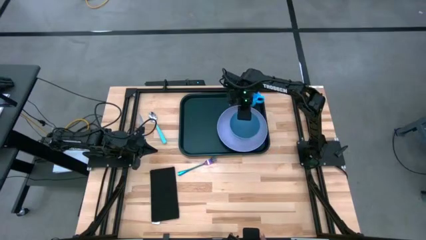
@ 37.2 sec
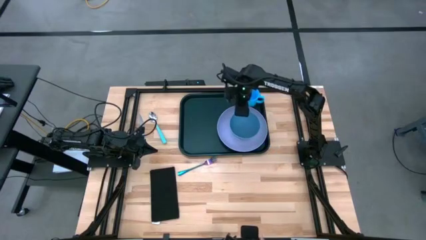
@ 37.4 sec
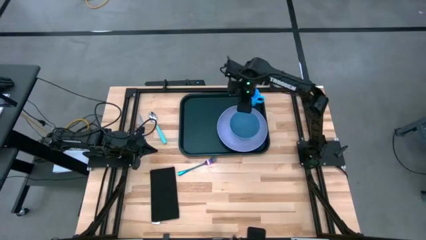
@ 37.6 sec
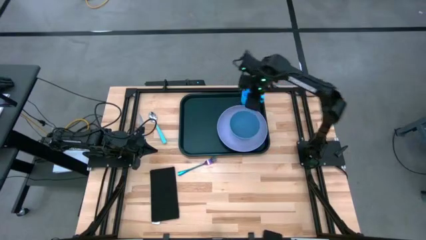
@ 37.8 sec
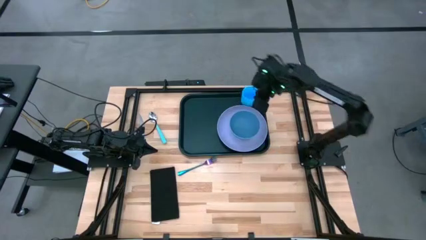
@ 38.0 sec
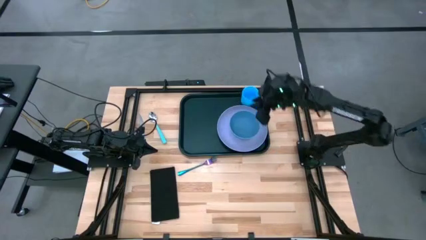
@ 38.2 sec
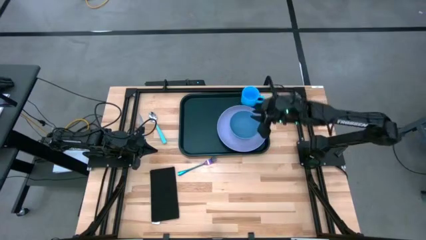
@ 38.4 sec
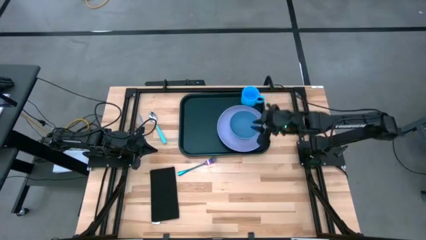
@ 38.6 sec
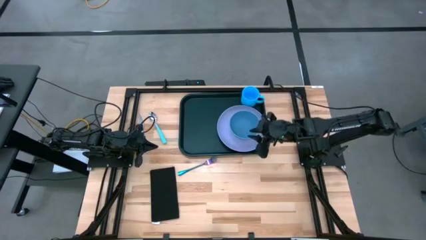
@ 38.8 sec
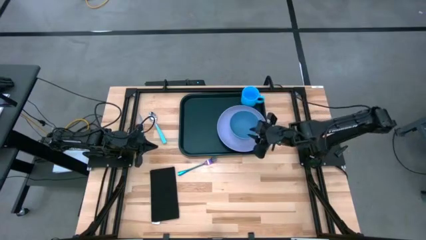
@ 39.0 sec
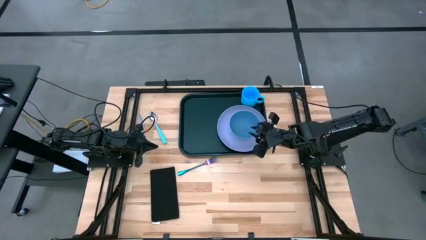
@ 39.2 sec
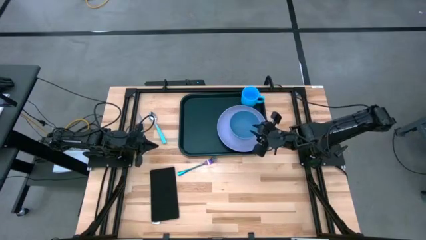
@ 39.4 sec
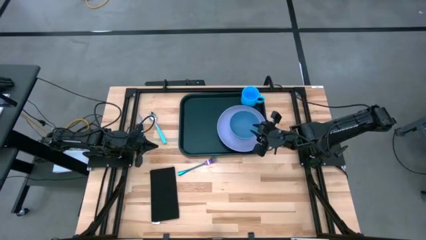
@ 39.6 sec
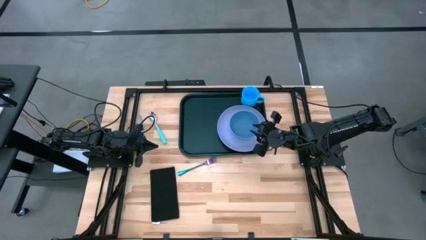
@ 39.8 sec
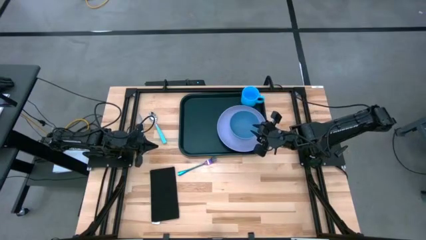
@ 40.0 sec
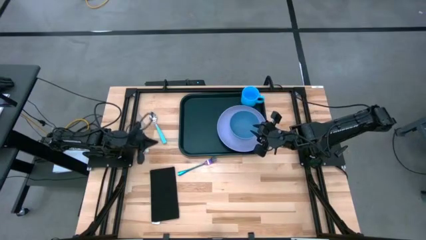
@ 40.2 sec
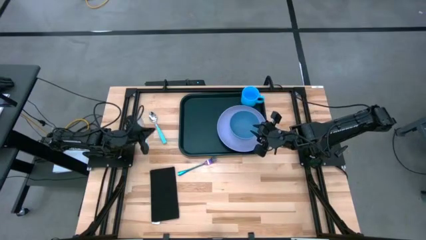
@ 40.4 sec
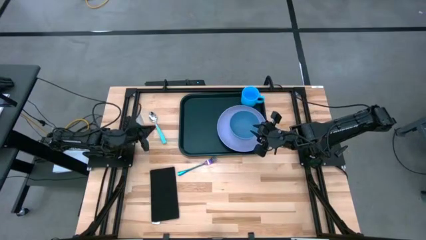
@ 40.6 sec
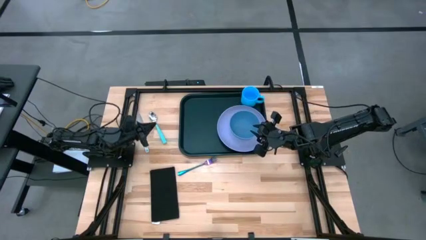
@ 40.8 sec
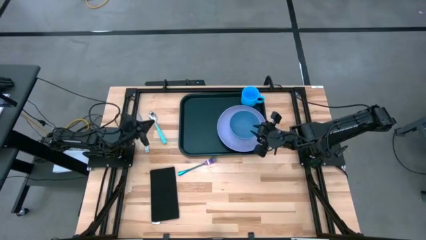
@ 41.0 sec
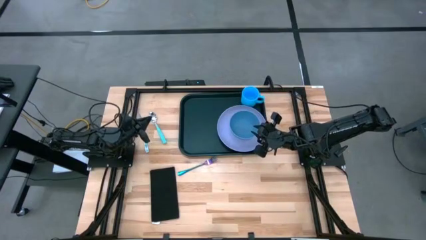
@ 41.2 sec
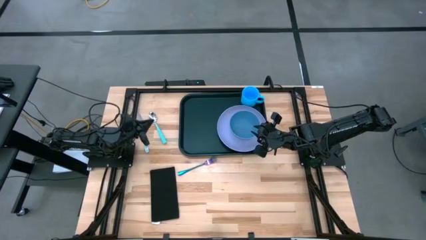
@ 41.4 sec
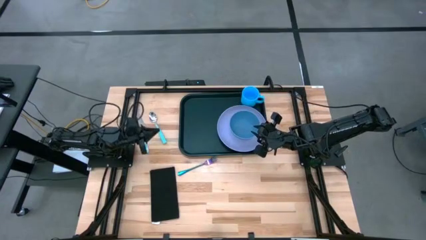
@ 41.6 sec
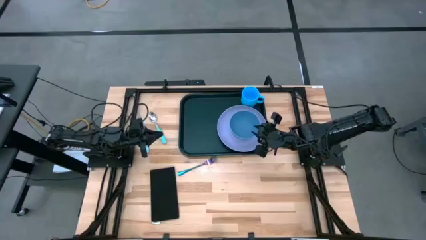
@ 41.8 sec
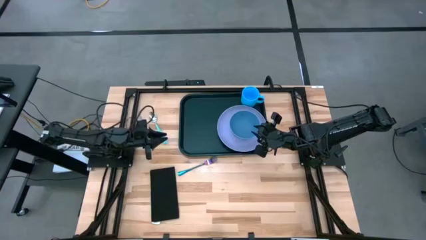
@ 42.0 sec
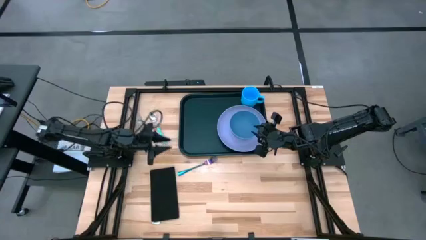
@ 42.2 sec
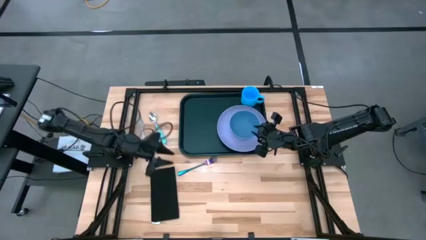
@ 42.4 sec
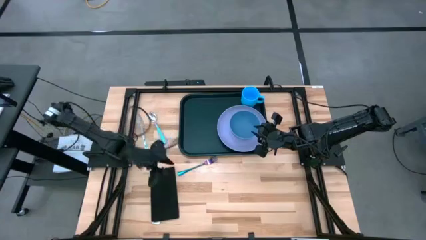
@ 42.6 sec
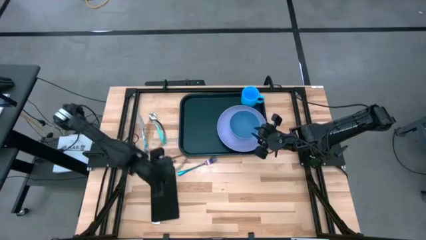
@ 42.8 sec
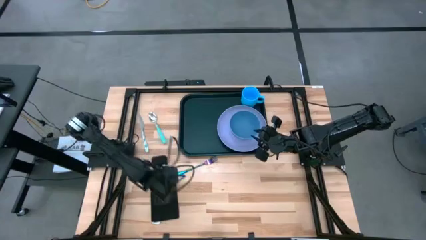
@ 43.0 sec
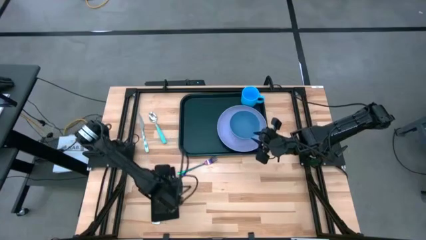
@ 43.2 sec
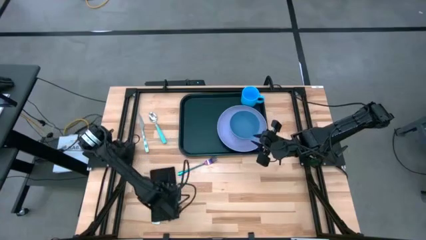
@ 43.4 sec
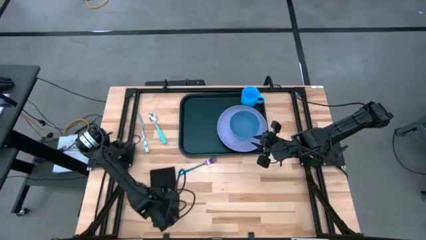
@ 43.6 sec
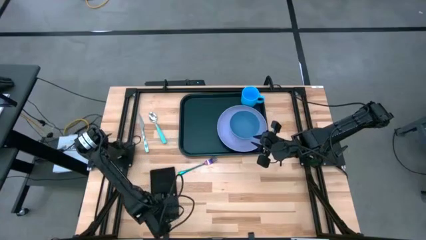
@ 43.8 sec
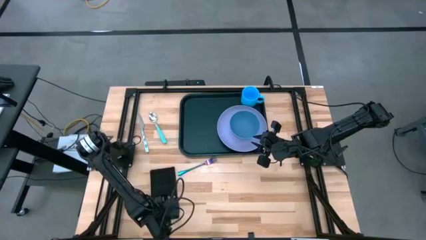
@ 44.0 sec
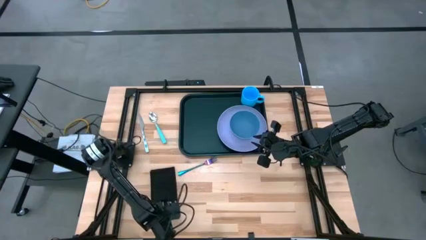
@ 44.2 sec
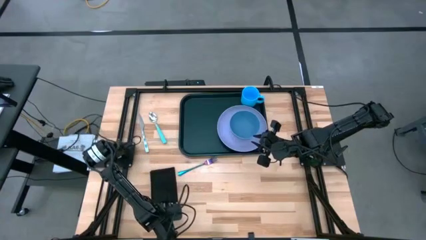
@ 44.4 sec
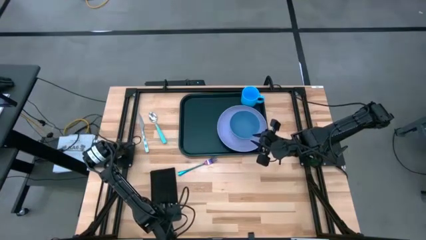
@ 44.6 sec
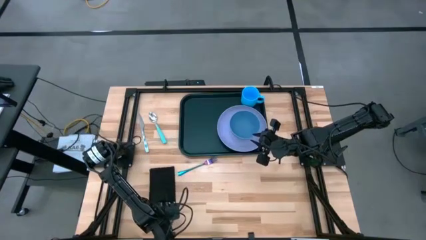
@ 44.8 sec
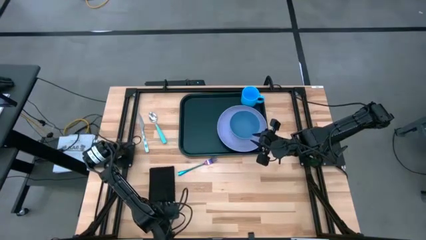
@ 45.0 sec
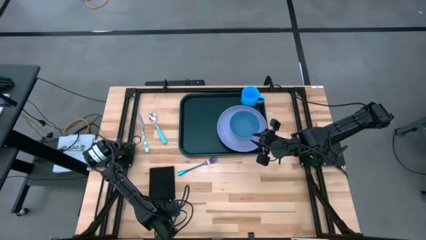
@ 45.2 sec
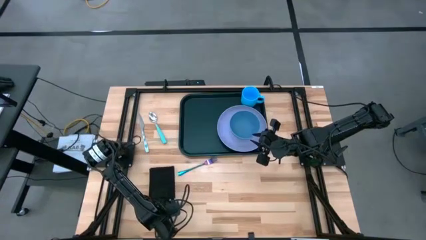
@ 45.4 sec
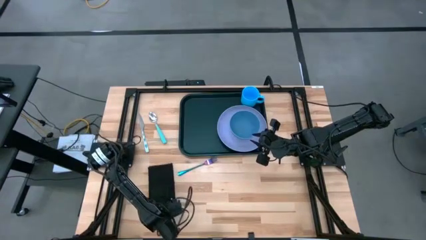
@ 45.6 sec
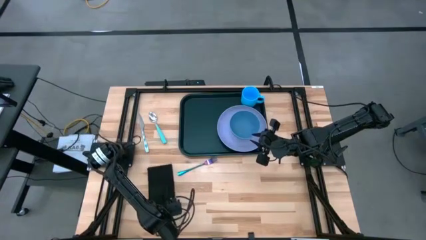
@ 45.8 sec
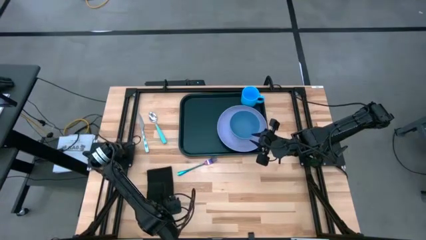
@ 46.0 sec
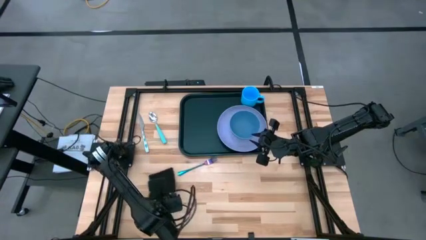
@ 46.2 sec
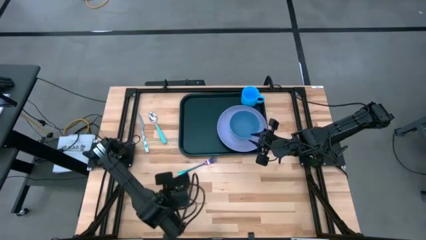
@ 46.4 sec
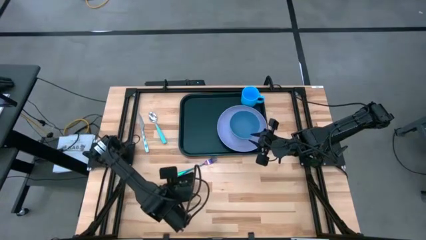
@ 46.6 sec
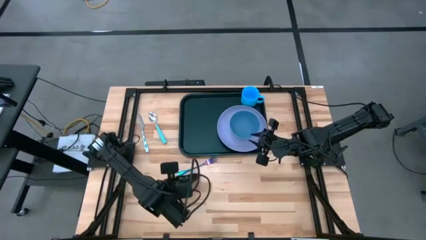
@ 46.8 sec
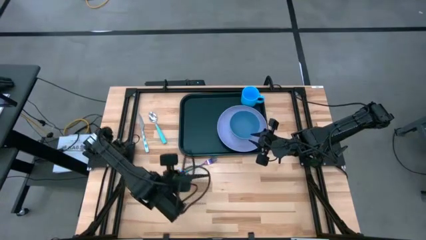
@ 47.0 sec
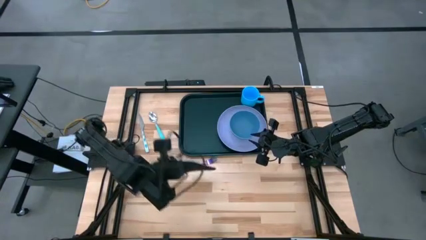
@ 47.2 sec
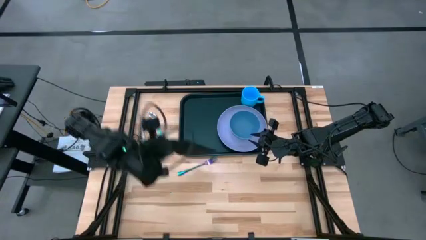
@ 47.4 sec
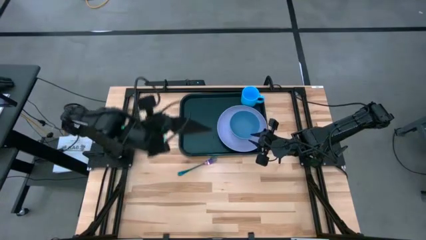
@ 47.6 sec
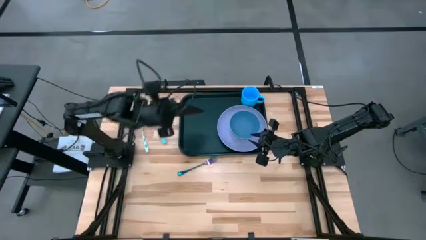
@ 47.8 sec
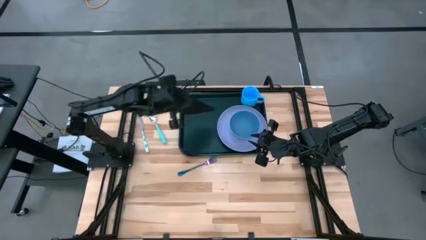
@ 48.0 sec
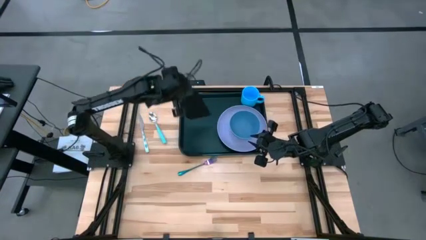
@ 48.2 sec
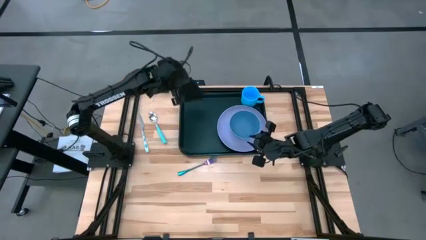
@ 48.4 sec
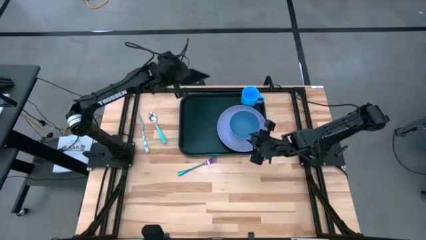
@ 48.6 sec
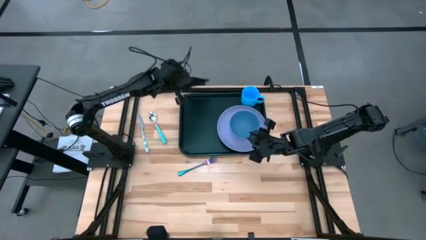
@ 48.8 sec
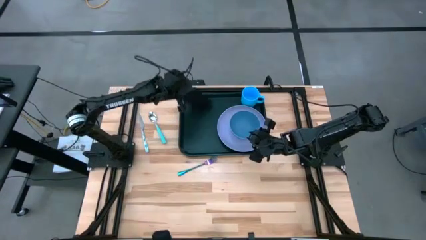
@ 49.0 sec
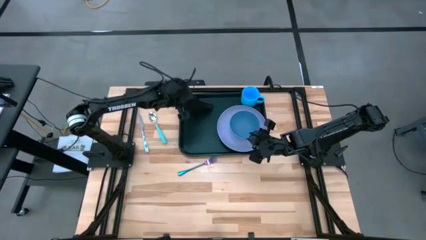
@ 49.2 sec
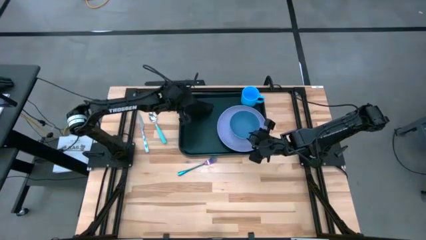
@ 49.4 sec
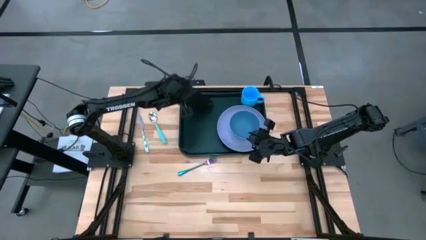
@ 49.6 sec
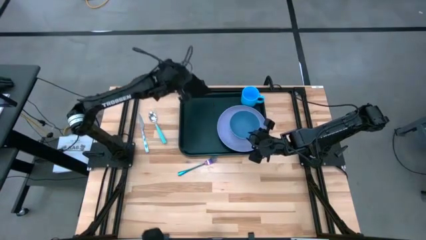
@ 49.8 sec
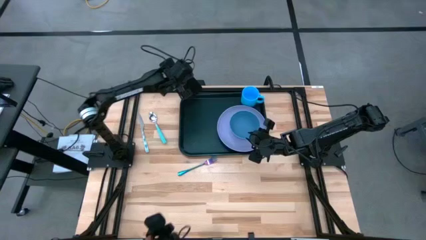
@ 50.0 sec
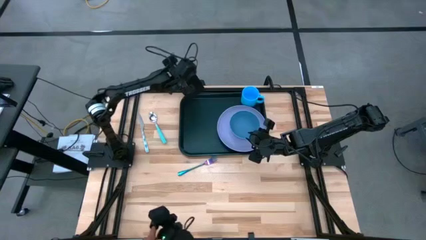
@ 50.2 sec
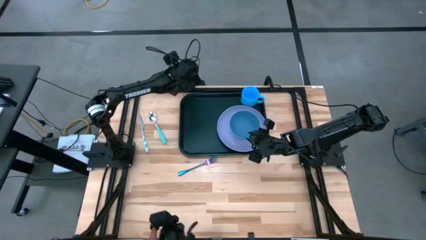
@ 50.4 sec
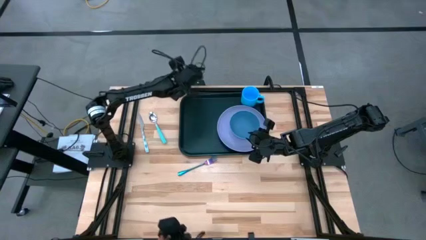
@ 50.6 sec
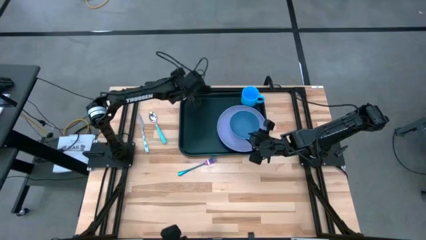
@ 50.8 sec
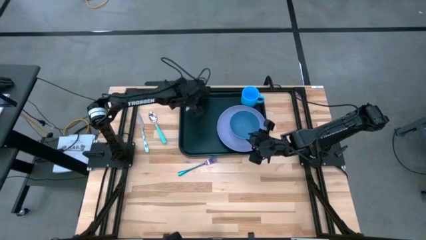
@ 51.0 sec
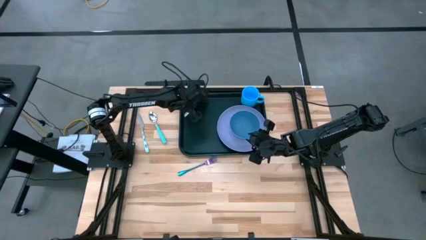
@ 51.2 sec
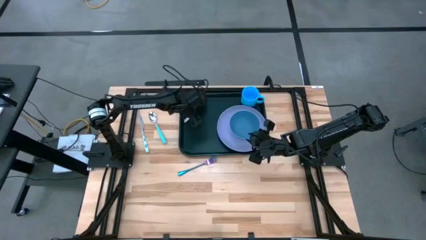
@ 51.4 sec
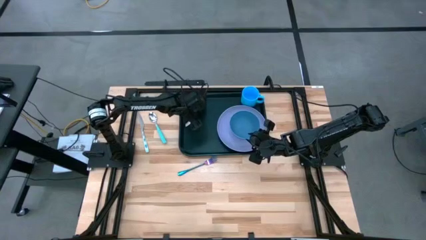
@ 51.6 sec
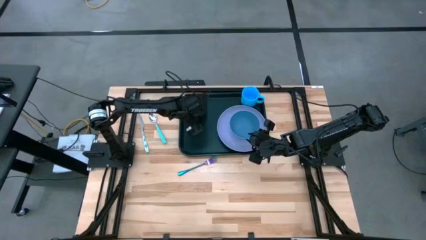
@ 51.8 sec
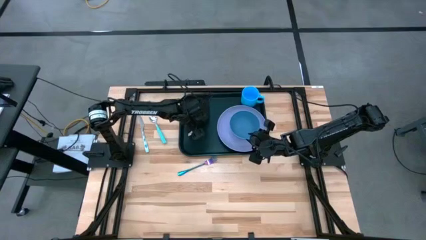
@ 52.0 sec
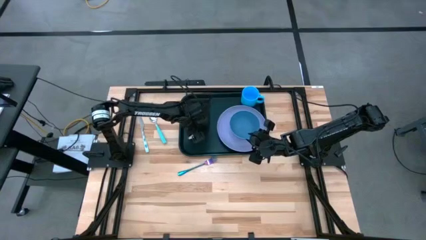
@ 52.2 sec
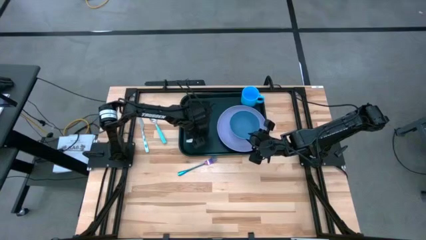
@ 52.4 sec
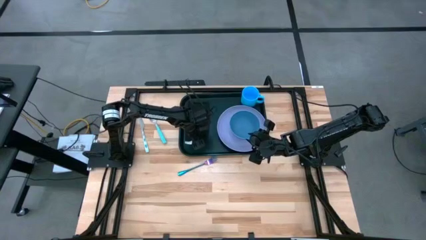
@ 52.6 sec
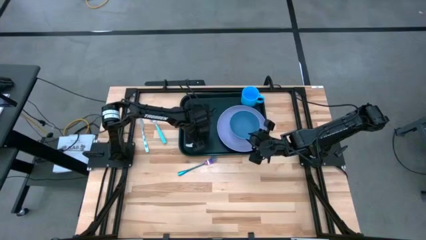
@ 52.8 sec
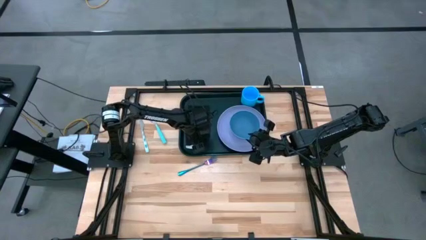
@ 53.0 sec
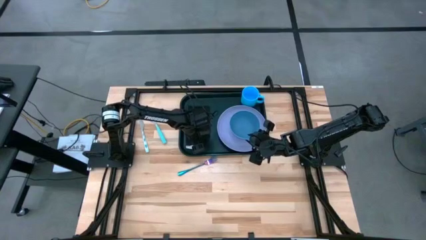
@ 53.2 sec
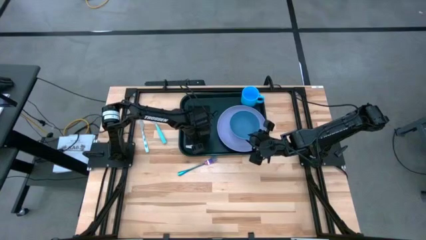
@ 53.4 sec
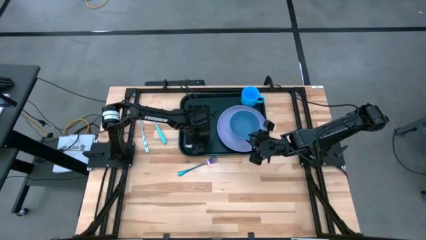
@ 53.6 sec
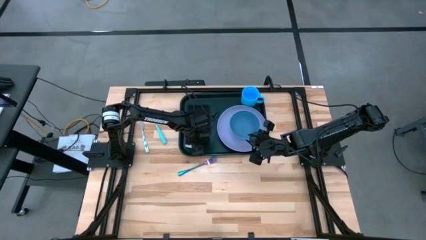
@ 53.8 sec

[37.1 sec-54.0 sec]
Task: Set up tray
Put the black napkin on the black serving tray
